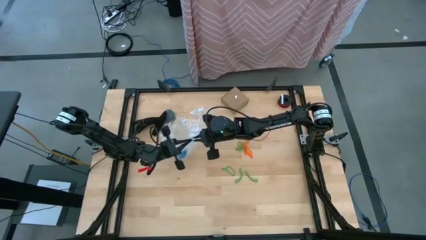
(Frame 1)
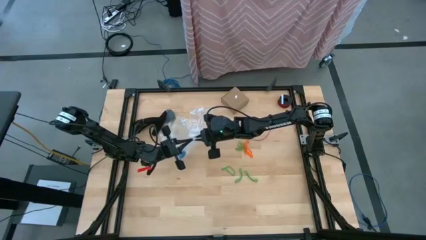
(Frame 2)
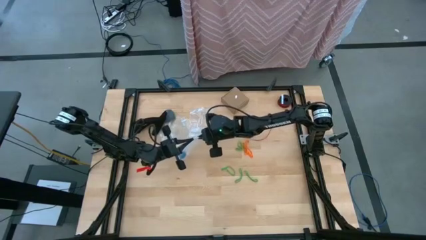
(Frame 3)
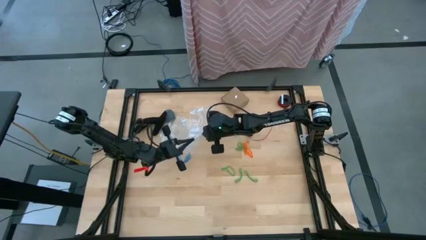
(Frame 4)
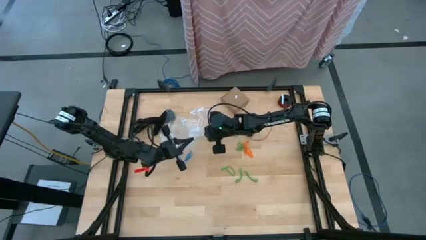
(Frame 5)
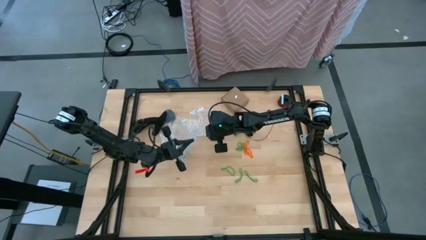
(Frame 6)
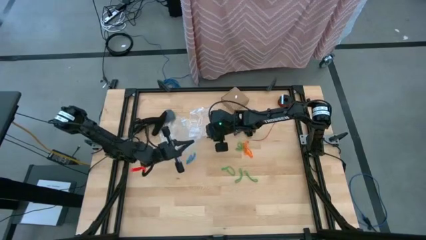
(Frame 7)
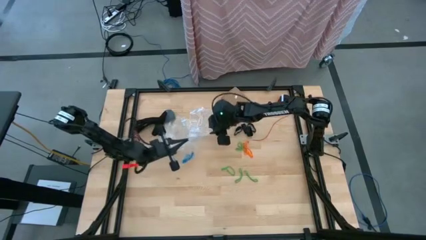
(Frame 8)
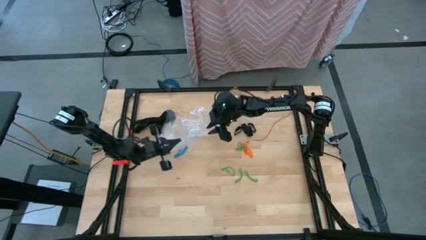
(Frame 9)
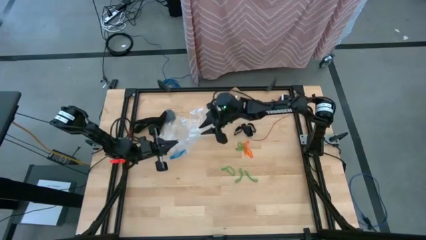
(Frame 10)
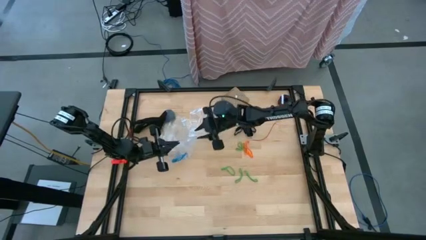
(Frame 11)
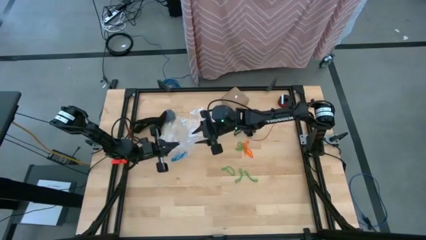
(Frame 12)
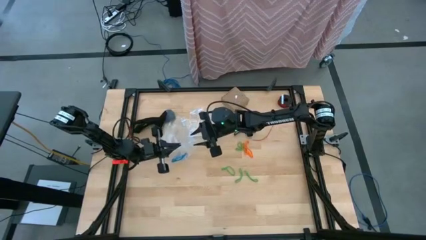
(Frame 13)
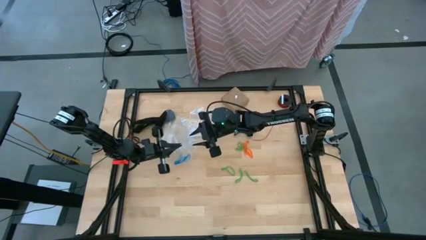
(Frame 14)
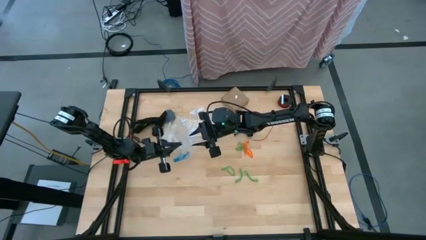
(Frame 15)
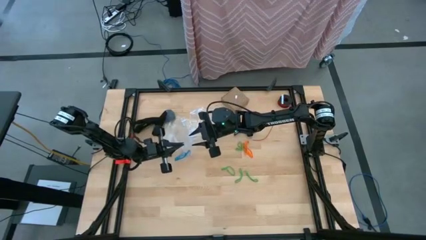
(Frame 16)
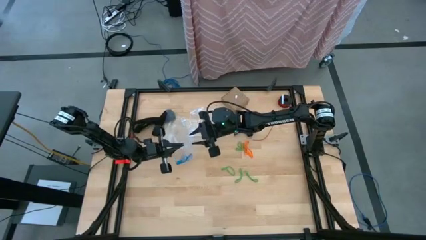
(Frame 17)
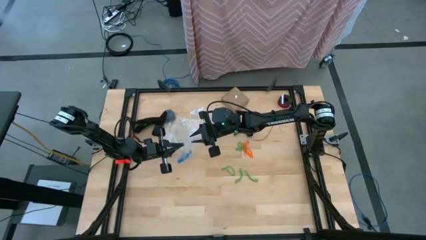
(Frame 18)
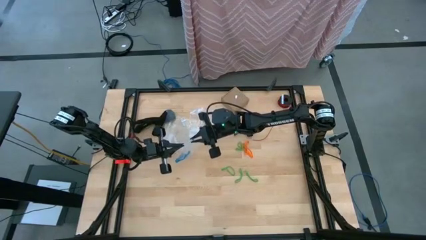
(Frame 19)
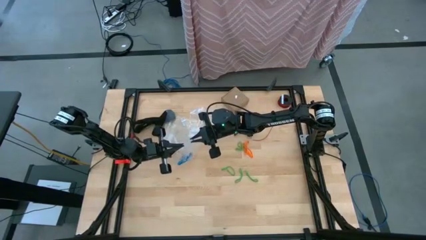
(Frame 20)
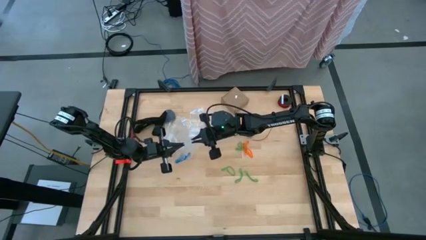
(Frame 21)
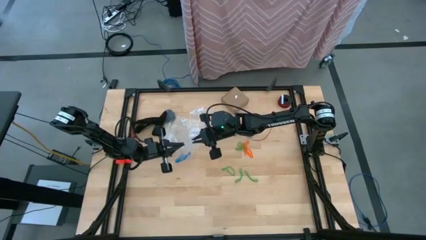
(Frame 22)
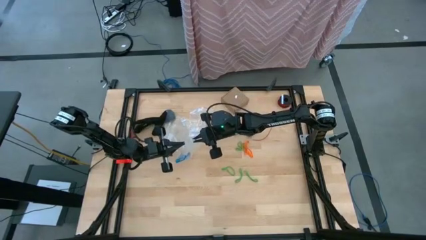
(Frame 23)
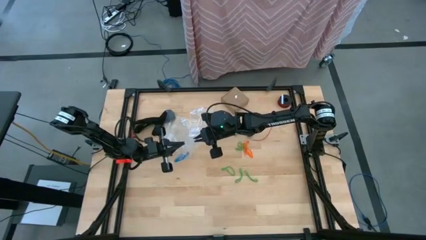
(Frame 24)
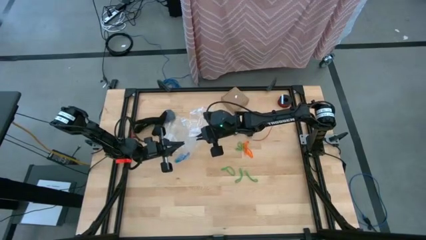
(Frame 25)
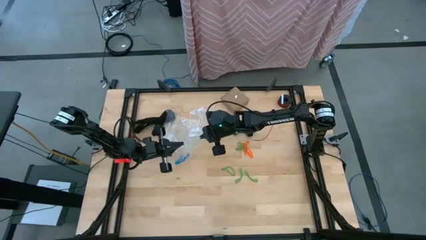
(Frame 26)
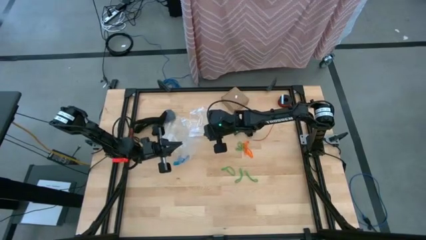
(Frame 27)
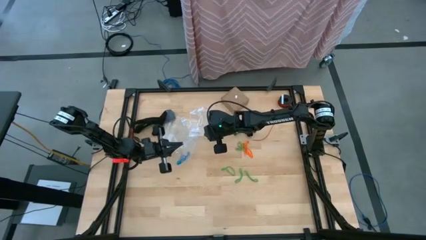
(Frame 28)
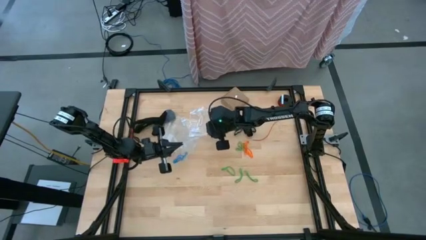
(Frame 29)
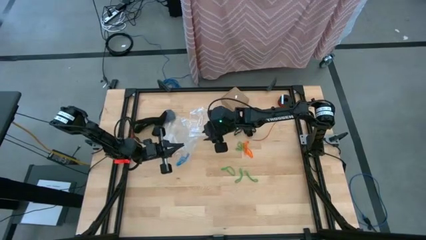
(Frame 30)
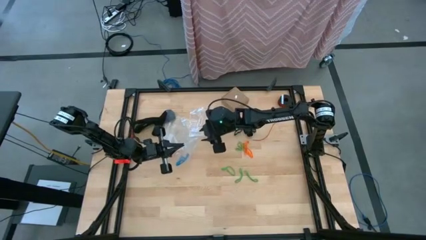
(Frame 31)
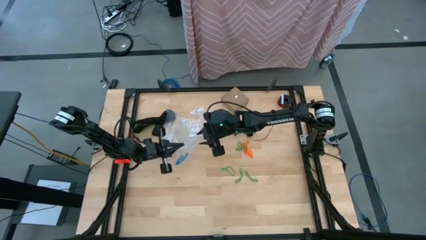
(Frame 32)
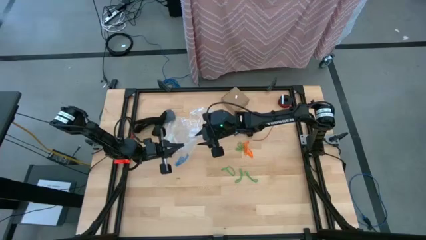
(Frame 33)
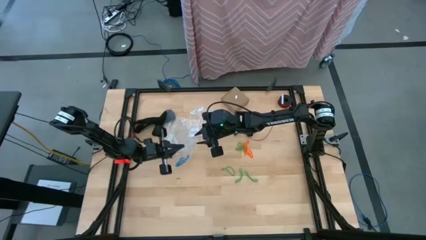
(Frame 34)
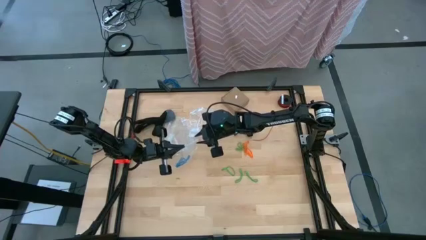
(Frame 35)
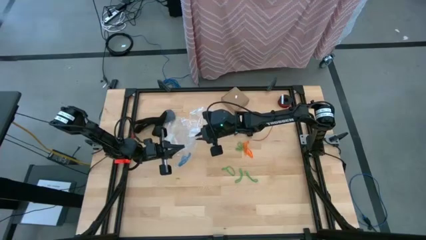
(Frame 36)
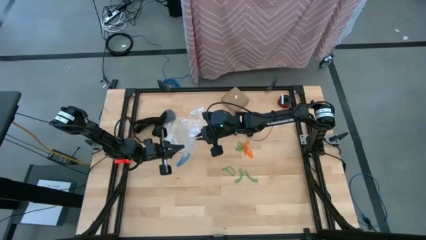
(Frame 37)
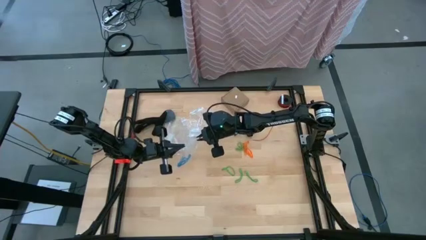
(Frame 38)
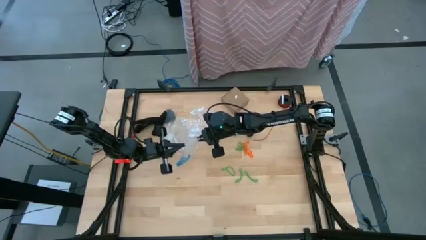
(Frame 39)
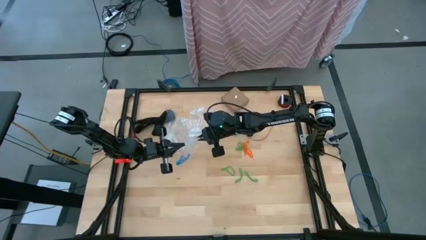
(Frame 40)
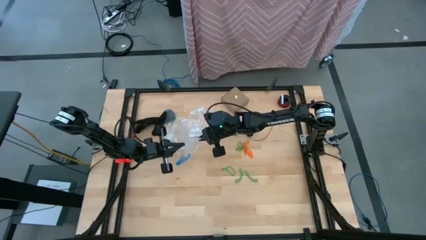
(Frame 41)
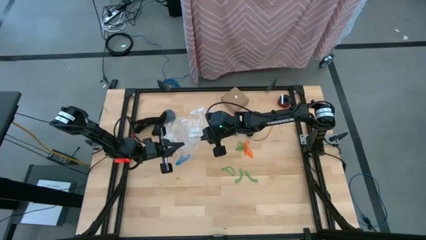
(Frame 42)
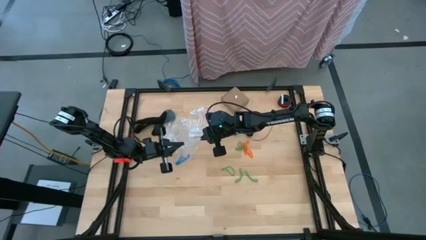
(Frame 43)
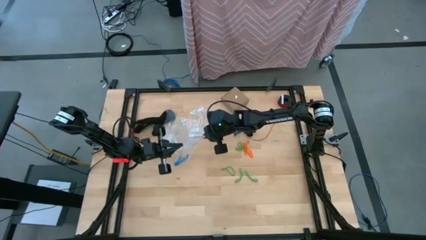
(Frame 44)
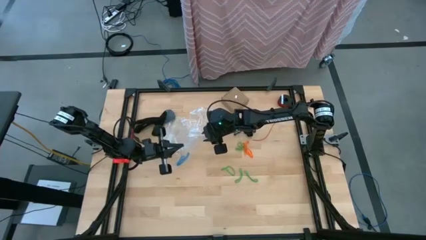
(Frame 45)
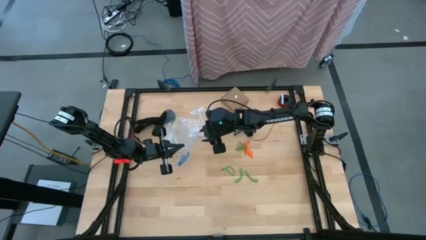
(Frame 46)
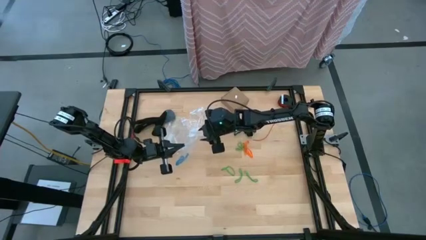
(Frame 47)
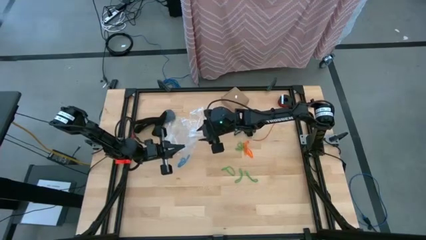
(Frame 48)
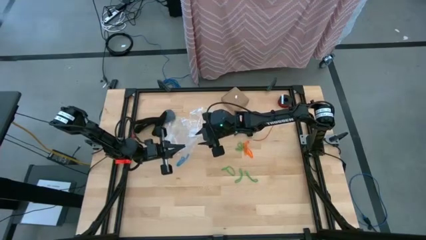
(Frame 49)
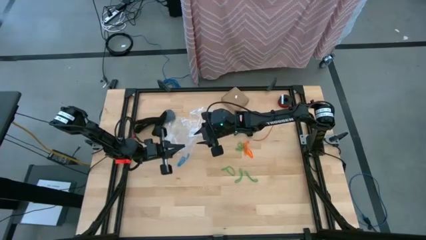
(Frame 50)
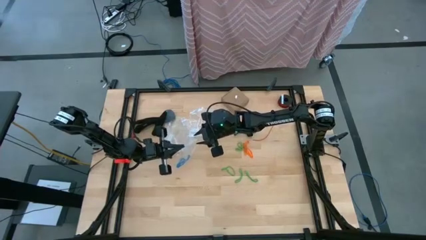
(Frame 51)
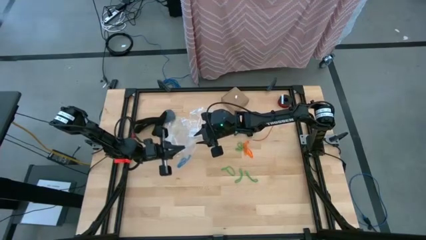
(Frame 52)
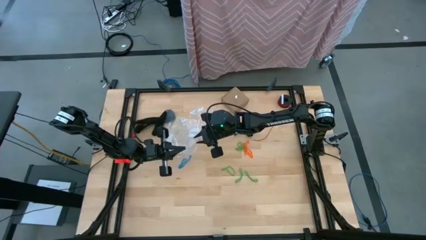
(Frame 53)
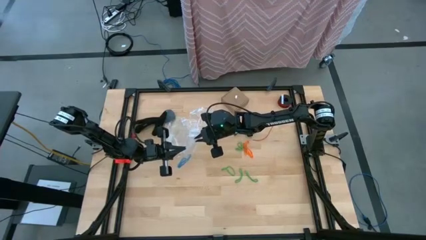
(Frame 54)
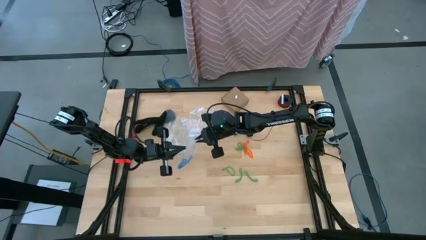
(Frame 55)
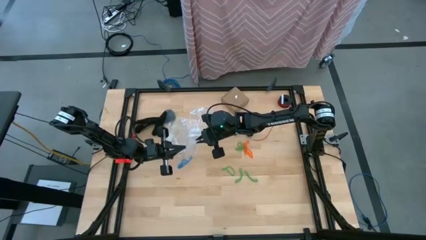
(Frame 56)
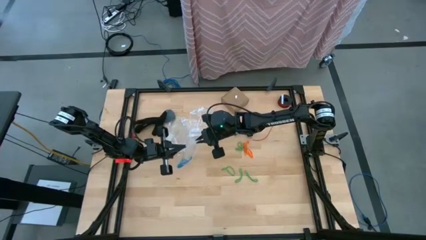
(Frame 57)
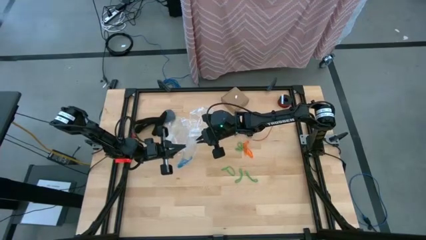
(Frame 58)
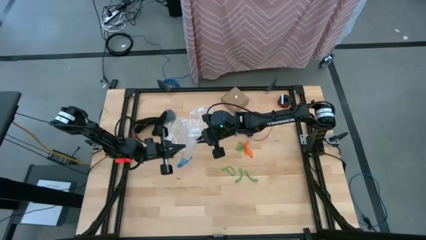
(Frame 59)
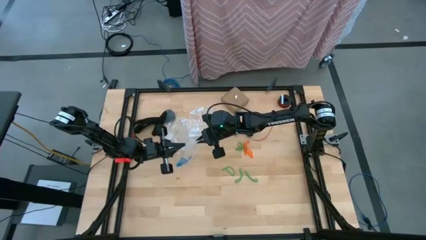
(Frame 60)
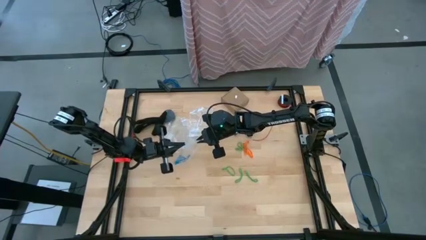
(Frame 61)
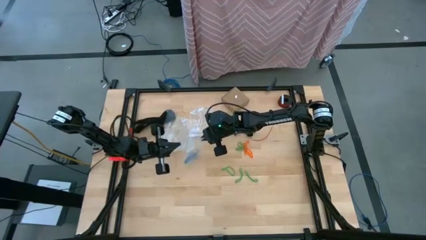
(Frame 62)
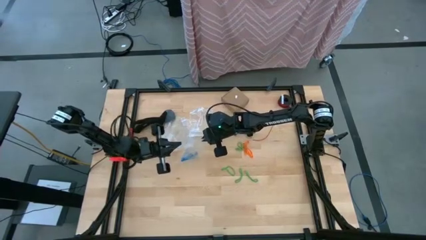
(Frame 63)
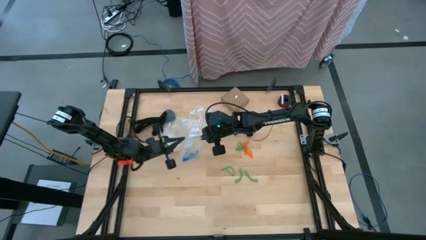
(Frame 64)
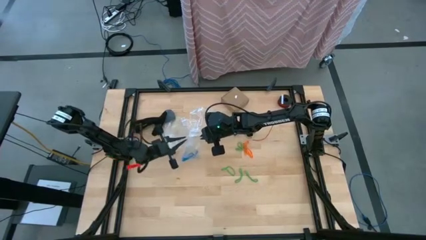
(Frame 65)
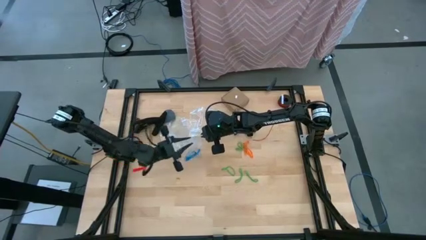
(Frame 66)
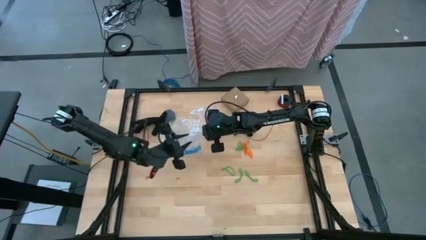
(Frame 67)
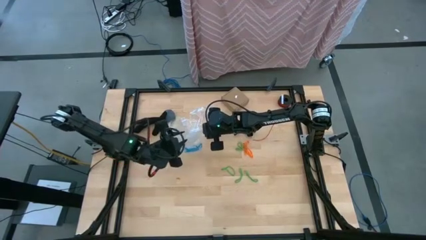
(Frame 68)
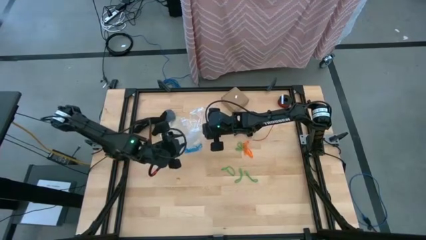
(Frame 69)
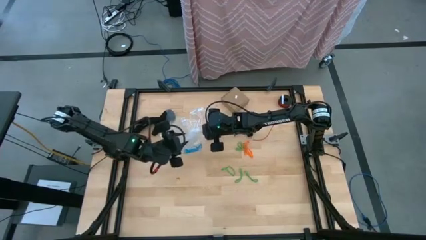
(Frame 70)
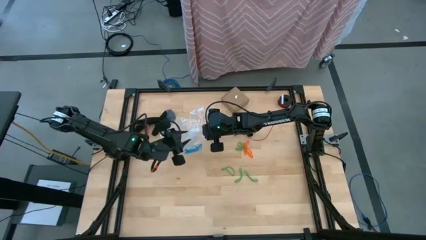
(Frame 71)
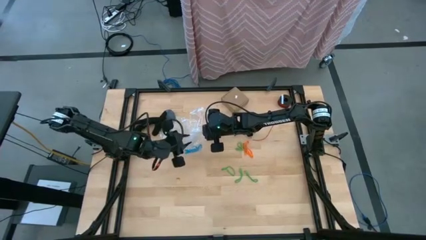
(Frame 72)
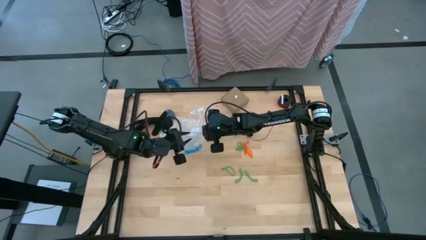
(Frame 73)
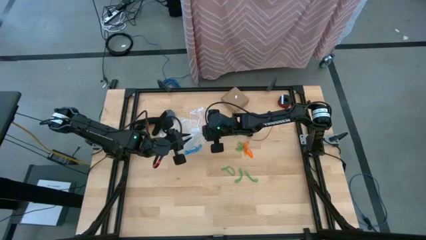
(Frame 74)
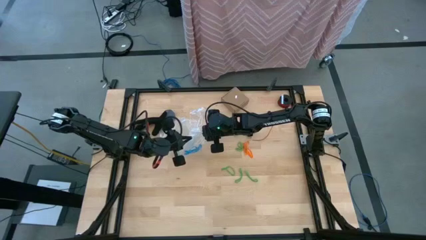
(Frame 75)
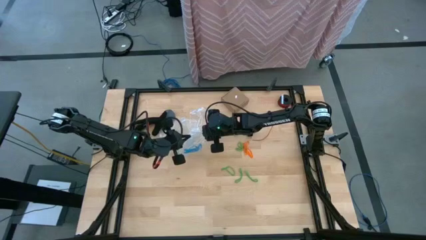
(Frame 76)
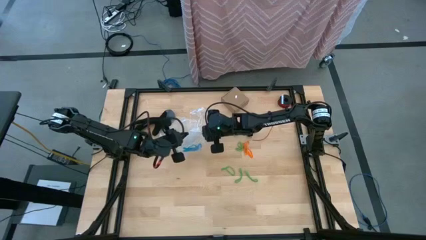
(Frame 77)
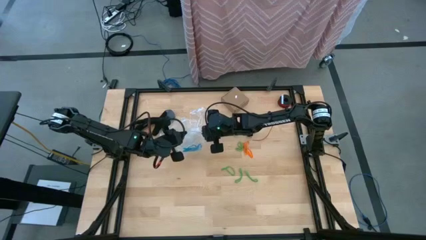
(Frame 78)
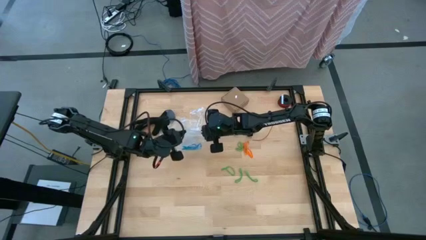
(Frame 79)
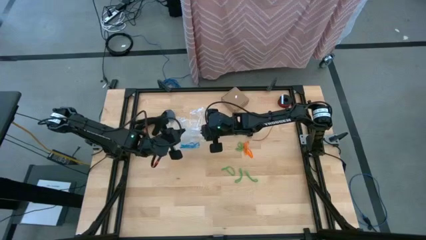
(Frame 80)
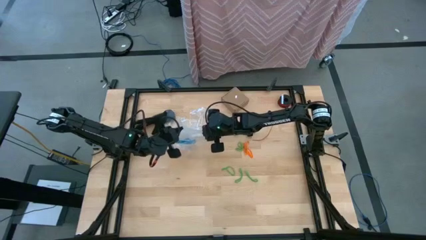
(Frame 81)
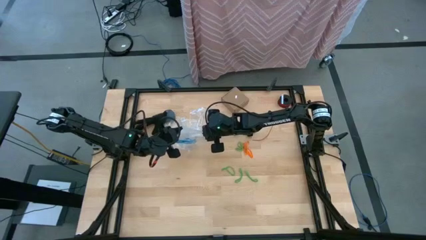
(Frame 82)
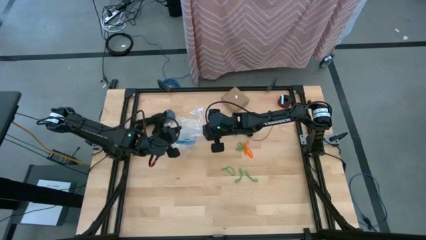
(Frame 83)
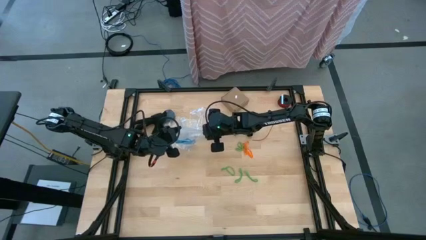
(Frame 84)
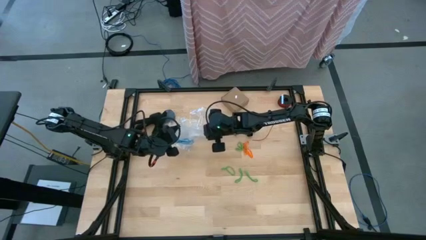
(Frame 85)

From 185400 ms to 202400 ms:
Task: Sort rubber bands
Close the transparent zip bag
